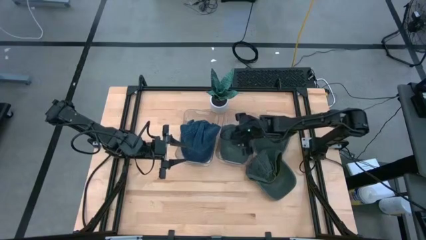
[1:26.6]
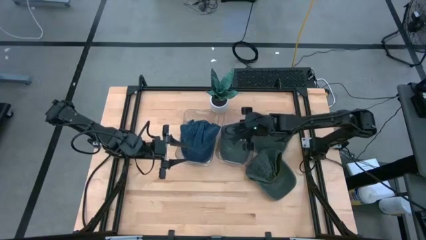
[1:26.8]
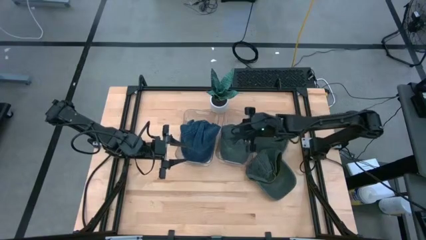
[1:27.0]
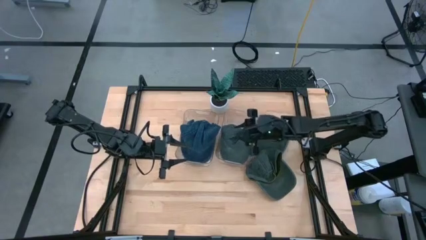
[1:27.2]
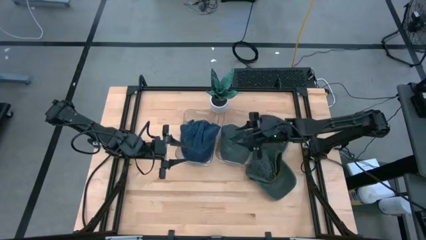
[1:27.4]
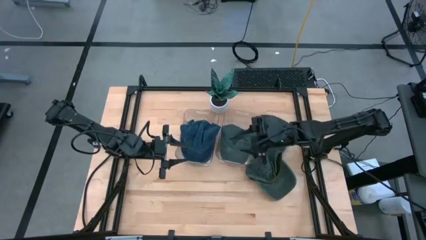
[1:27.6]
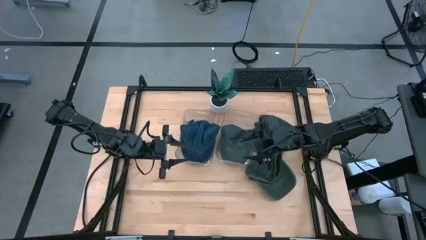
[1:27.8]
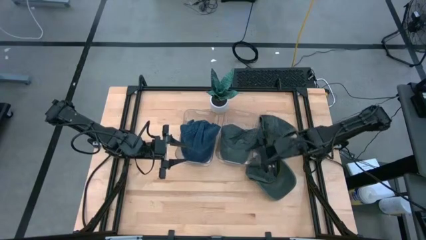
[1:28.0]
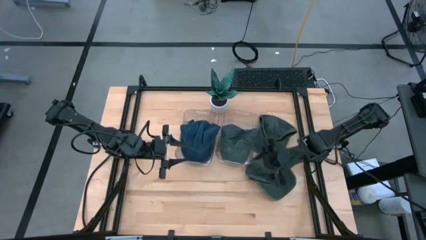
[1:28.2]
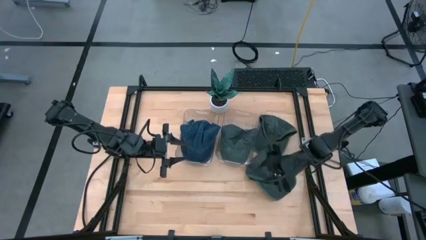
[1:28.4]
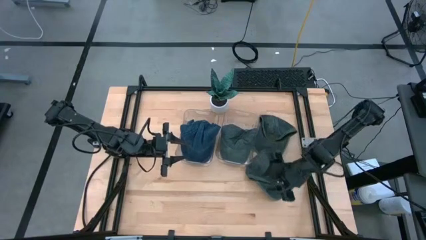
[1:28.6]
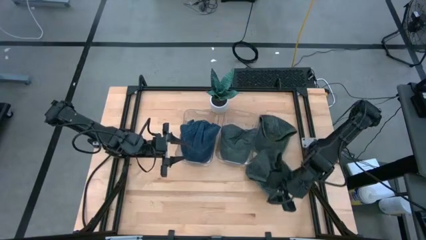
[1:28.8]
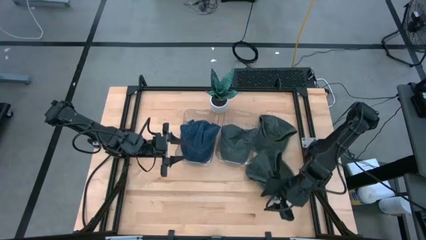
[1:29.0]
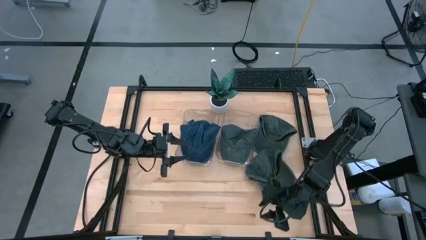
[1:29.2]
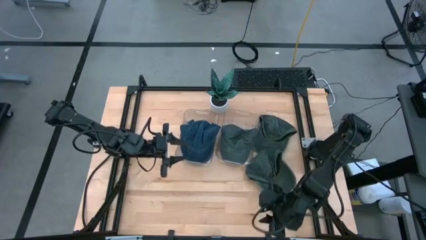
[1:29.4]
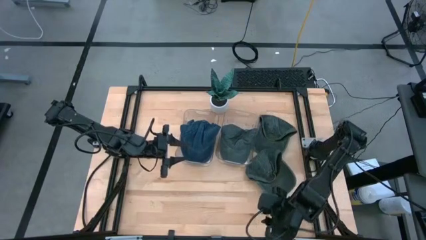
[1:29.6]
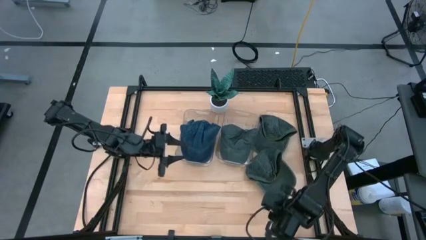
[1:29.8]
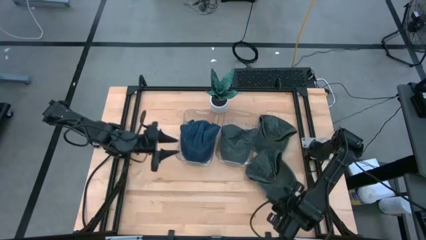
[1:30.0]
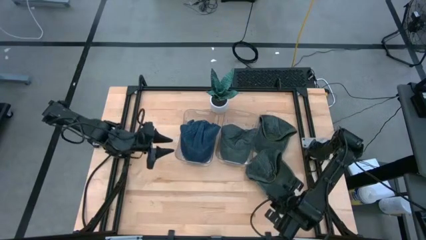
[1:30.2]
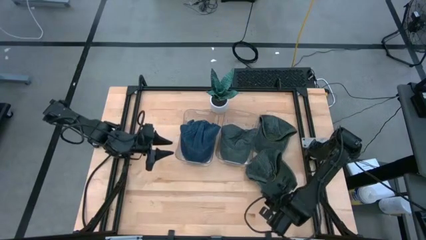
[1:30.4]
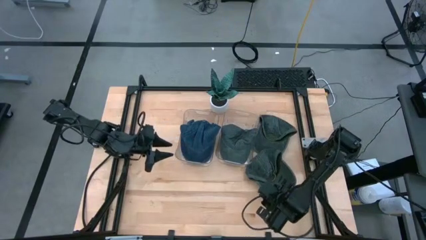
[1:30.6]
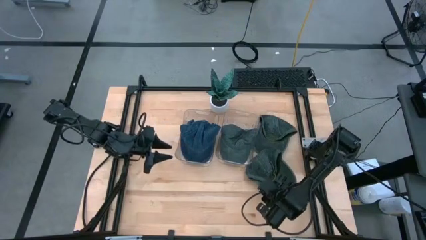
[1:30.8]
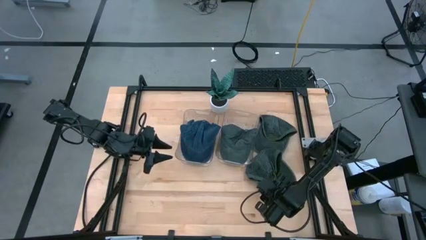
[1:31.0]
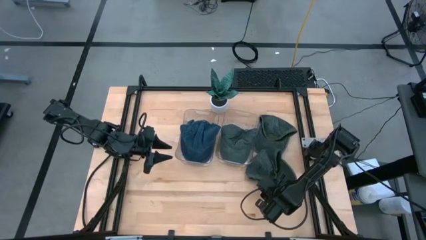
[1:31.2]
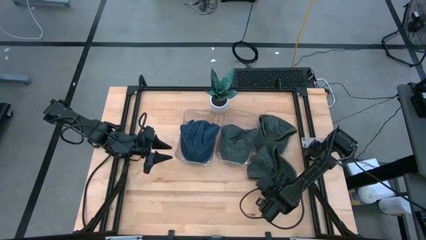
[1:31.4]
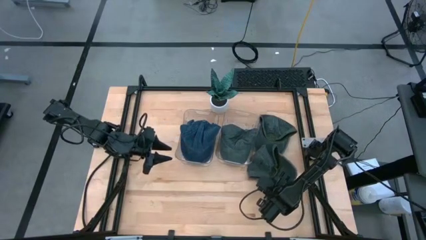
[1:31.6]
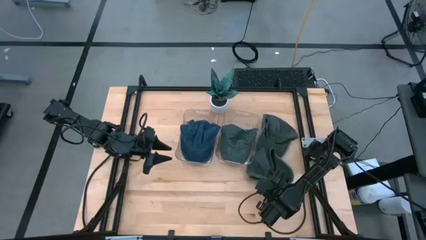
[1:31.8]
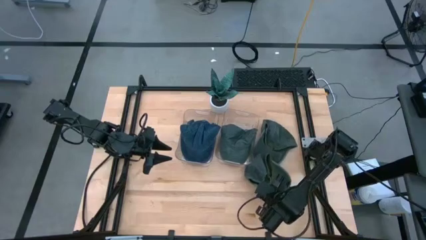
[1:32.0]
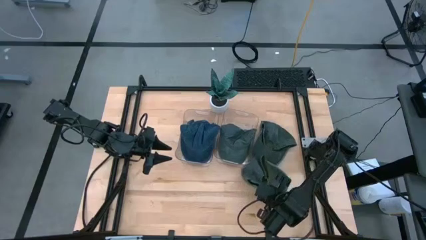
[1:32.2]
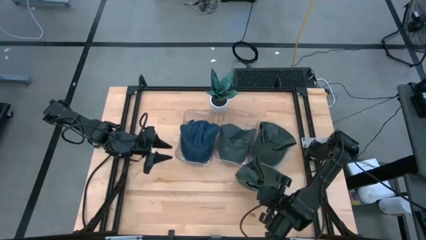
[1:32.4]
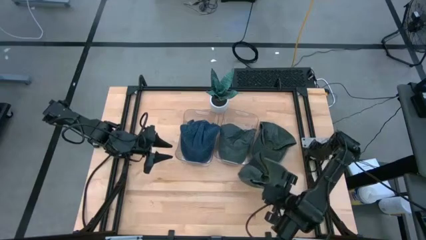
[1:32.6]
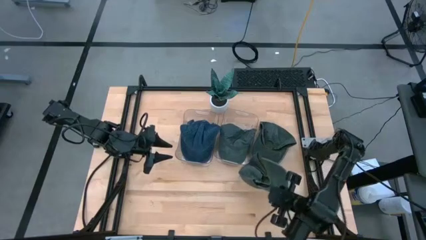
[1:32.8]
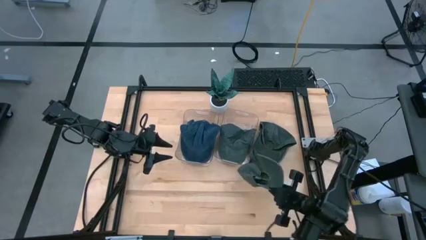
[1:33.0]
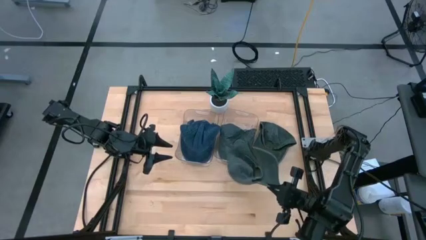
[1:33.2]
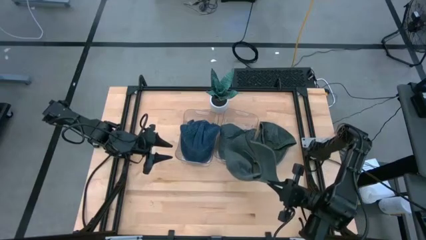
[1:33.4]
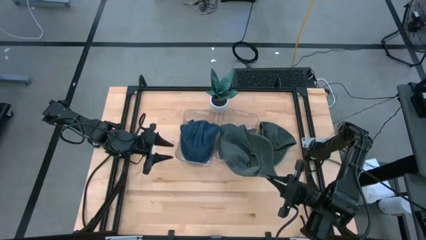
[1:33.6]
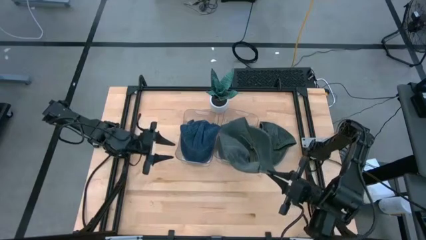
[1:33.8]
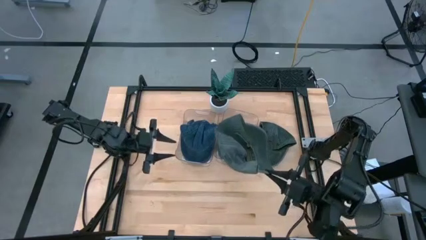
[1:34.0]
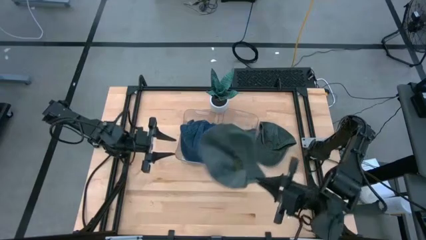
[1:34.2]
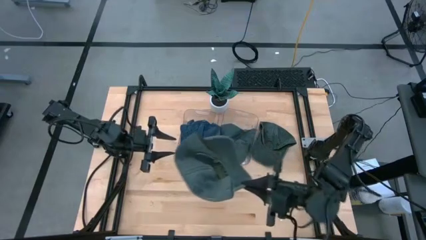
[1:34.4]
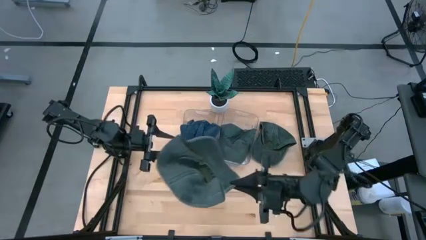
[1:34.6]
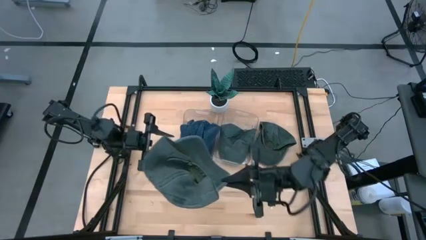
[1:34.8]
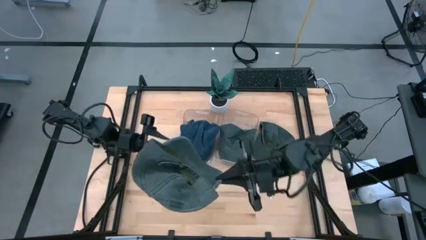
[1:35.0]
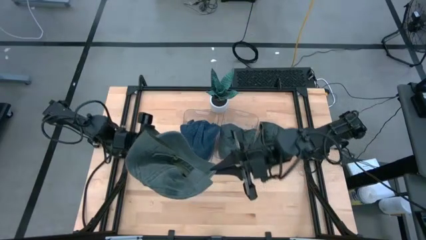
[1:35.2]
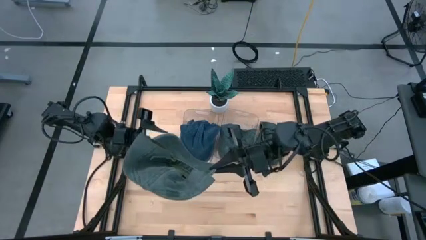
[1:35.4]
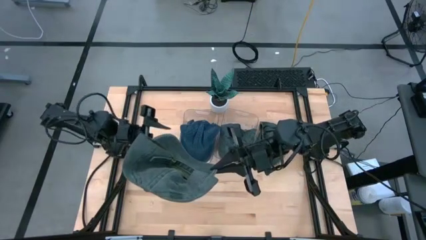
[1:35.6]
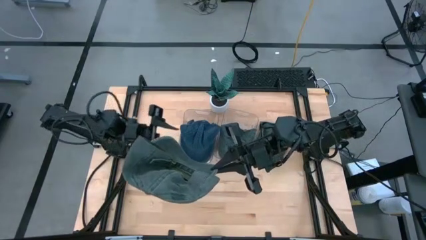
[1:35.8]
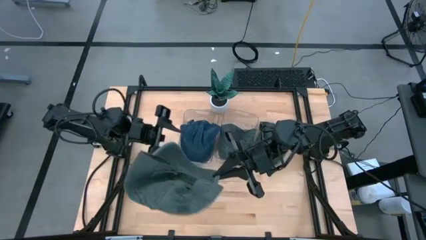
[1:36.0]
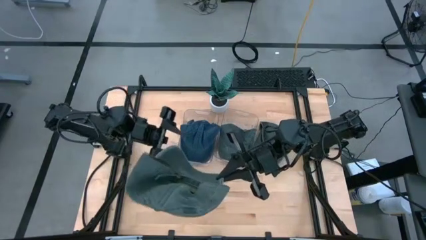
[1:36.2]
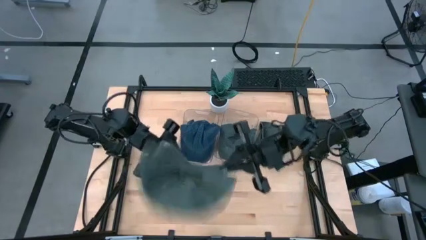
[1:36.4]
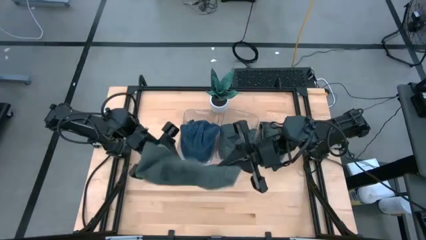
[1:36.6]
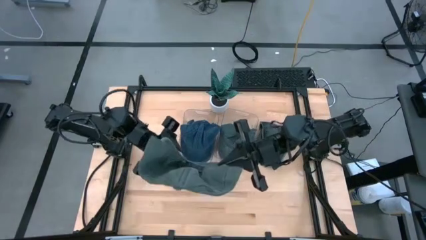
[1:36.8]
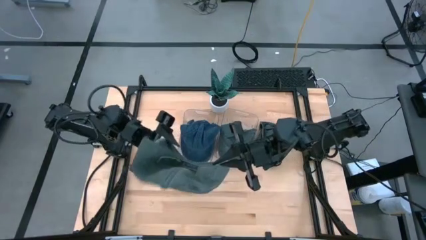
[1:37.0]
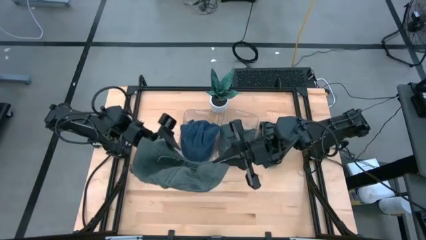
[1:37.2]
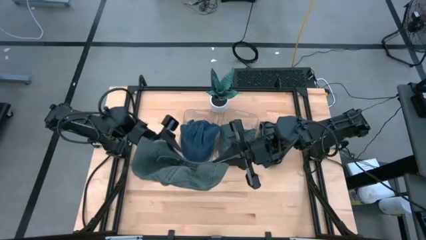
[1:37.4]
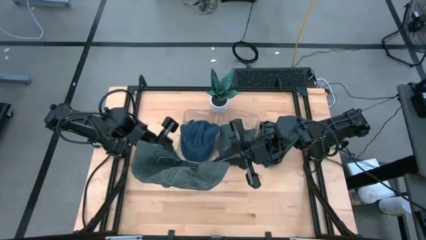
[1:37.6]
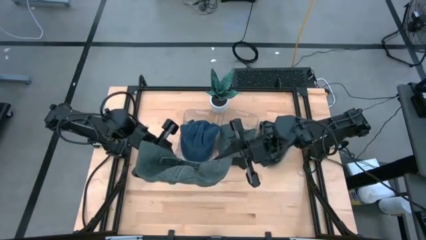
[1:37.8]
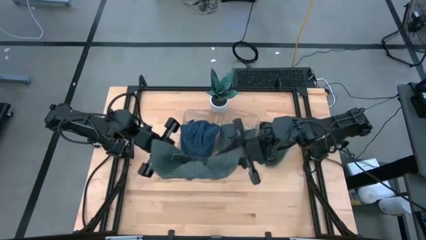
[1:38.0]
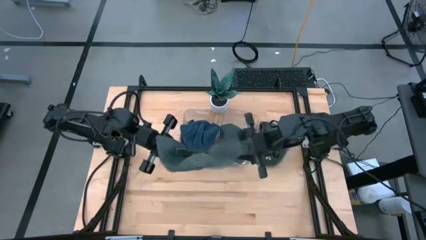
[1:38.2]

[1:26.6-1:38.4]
Task: Pick & Place hat
Put the bottom gray cap into the right transparent bin

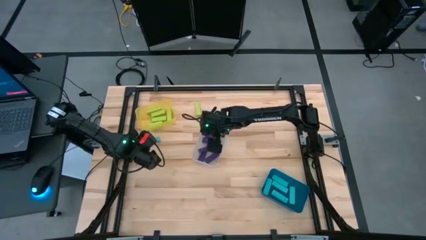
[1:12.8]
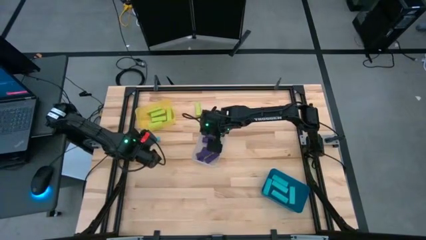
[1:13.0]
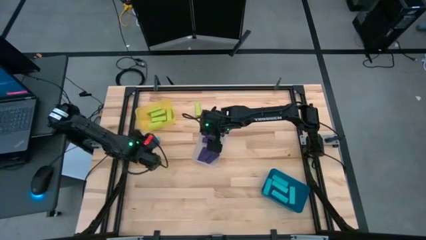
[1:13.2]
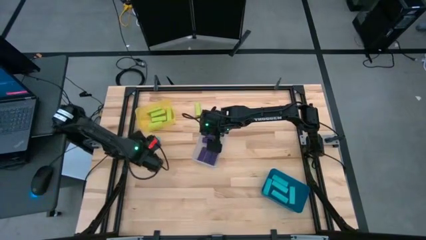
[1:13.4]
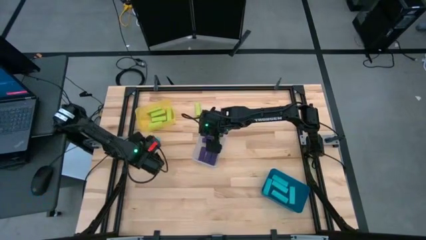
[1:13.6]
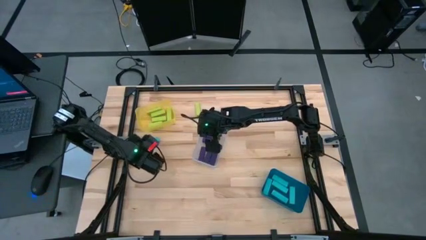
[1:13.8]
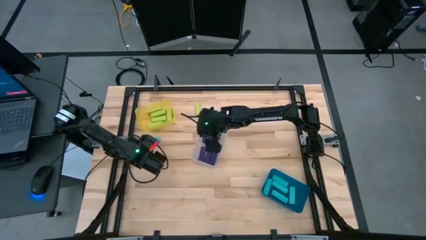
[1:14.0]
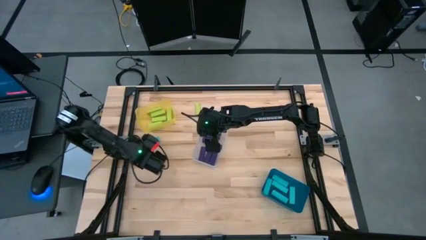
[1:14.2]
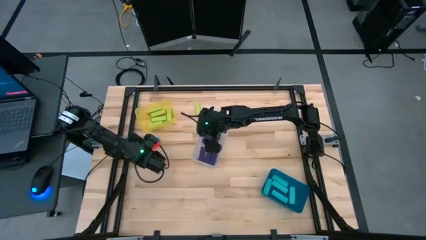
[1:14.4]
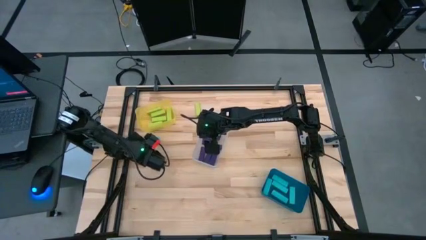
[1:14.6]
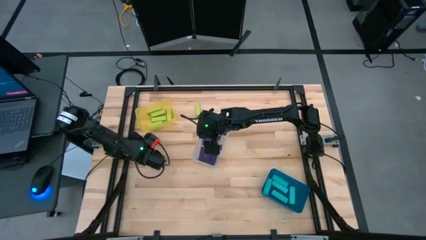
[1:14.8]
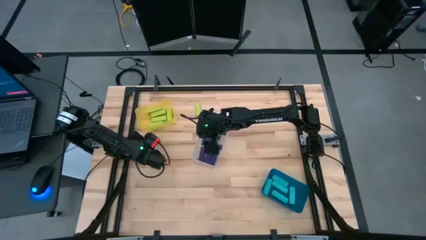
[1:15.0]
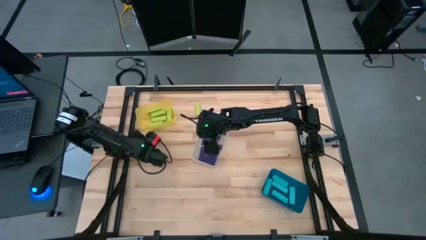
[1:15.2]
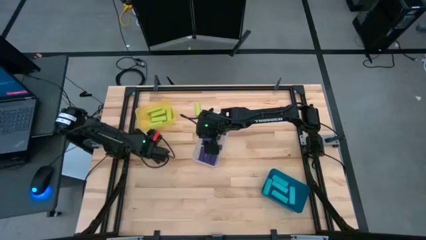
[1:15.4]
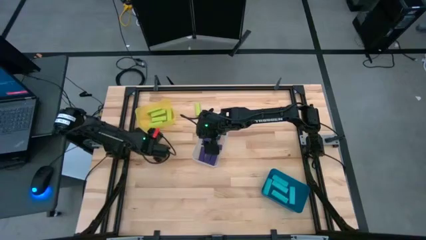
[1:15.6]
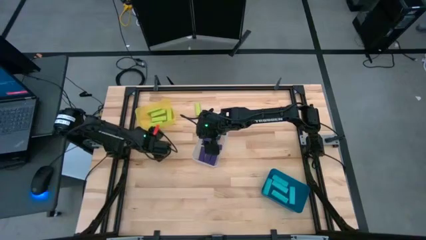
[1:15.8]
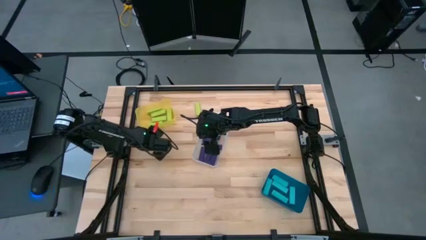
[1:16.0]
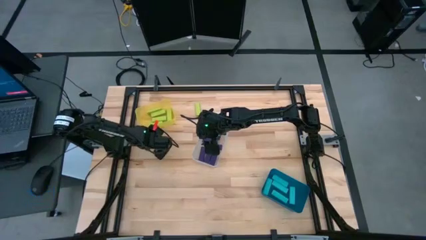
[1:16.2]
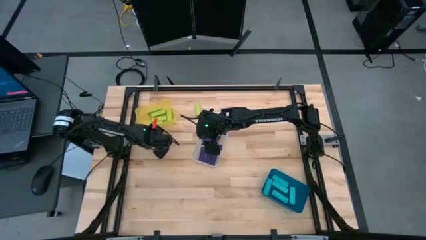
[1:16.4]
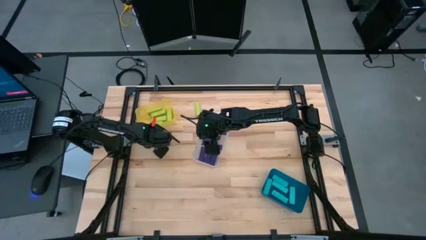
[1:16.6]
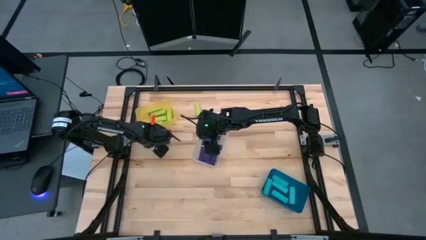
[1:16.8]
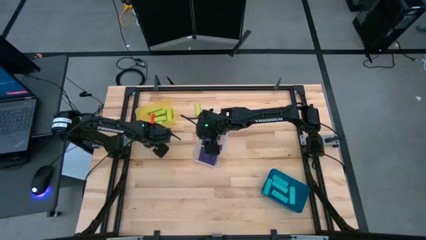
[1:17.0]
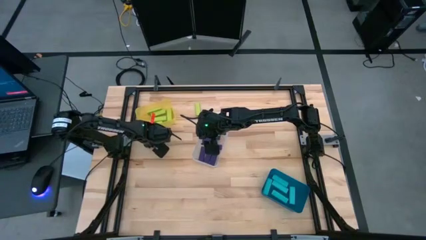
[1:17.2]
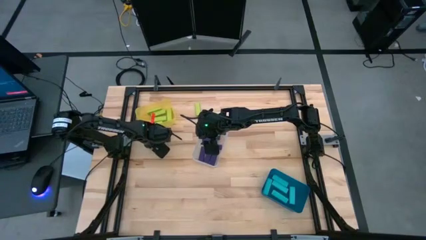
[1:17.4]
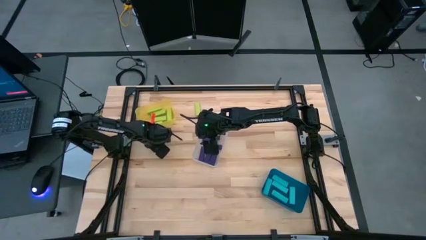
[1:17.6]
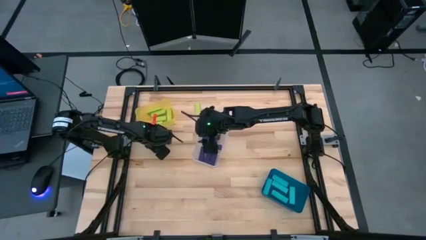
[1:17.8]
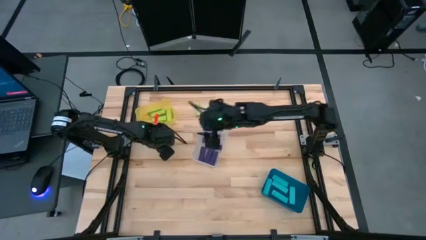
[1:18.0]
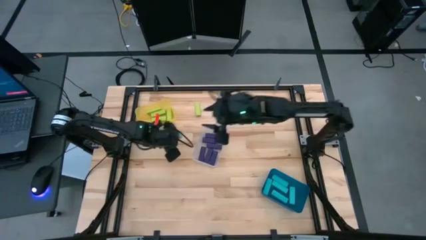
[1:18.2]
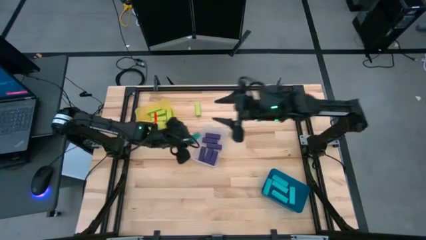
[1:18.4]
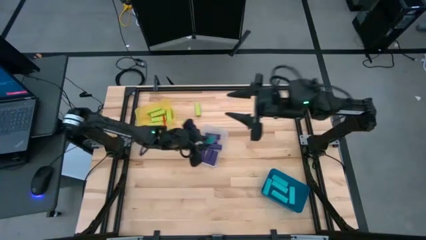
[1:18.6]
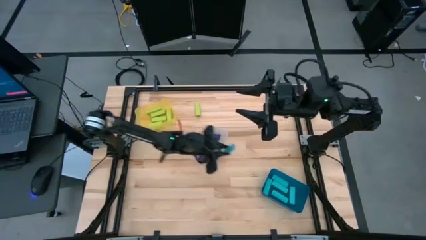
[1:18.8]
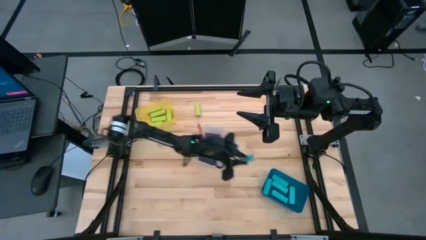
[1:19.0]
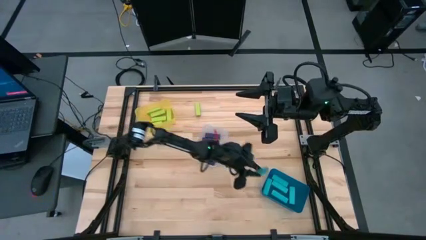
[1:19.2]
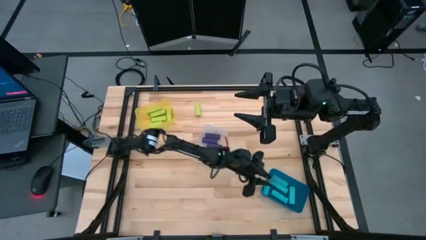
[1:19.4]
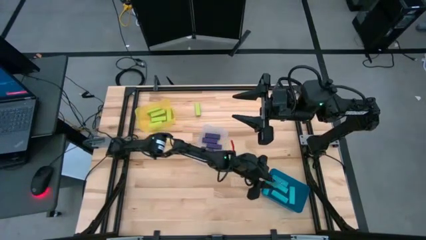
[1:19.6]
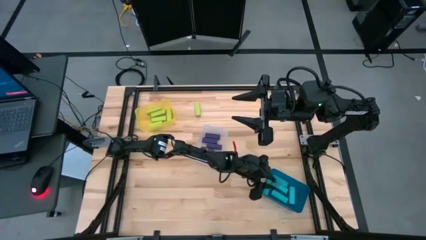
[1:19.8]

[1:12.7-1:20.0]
Task: Sort blocks
Put the blue block into the blue bin
